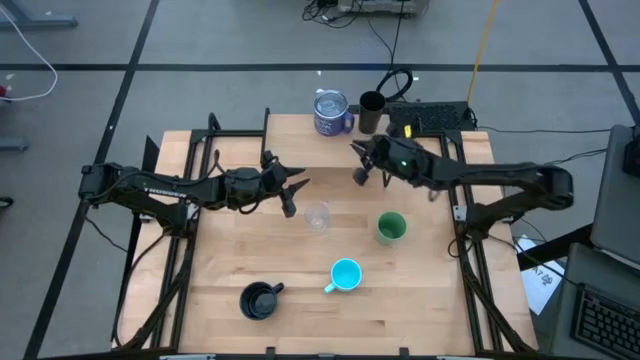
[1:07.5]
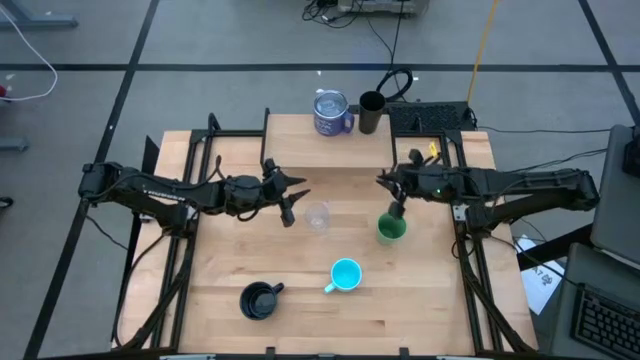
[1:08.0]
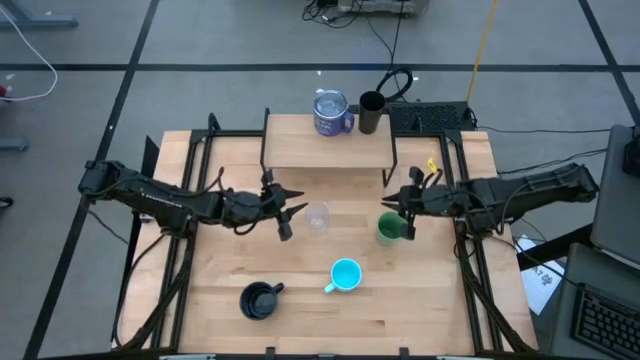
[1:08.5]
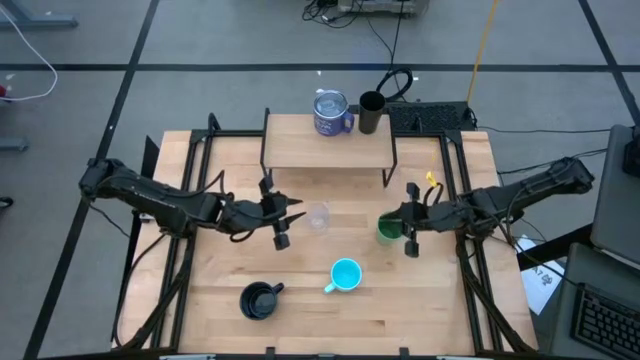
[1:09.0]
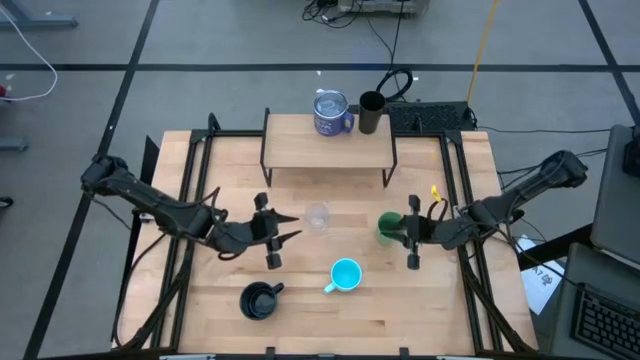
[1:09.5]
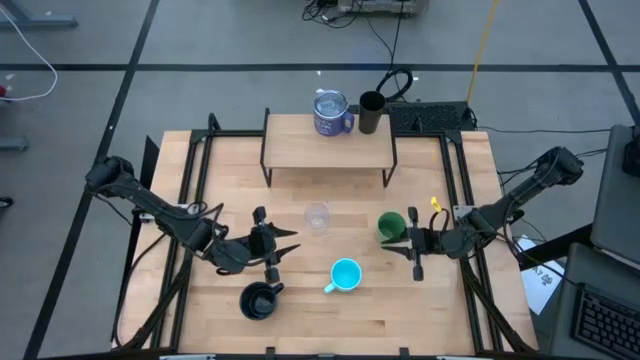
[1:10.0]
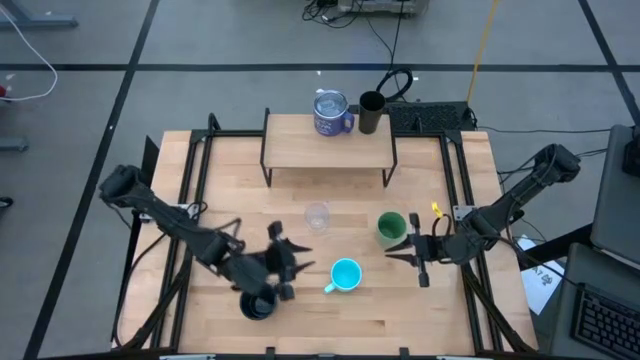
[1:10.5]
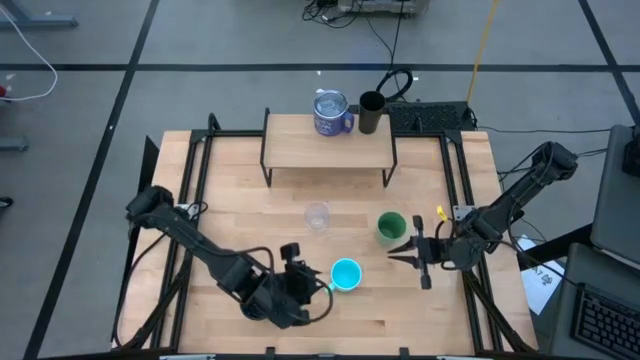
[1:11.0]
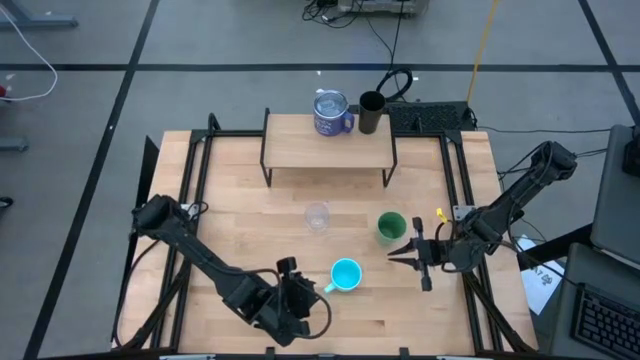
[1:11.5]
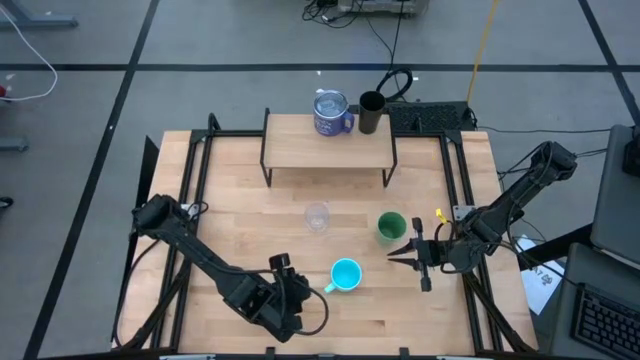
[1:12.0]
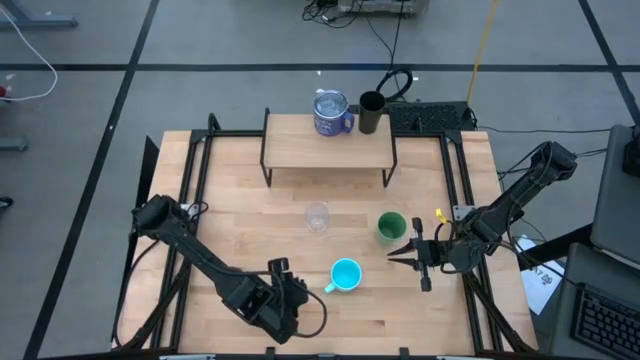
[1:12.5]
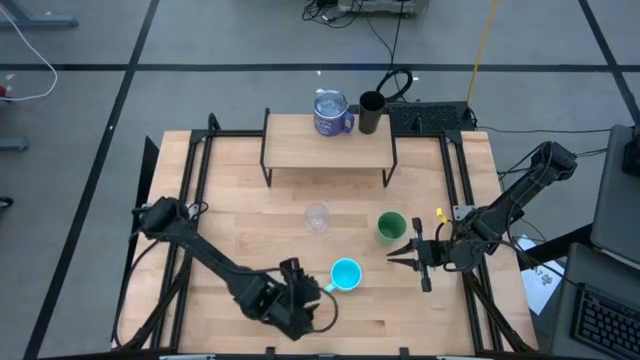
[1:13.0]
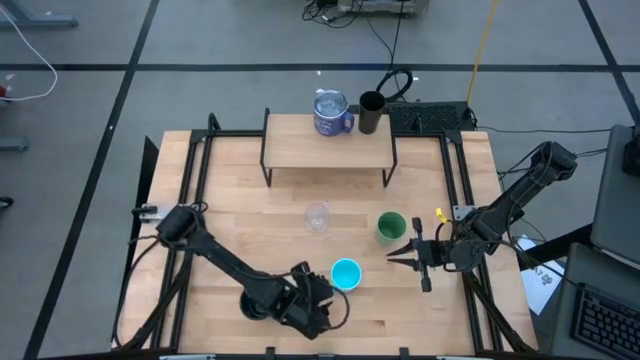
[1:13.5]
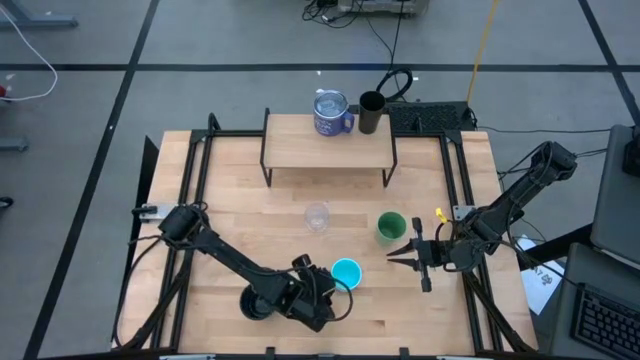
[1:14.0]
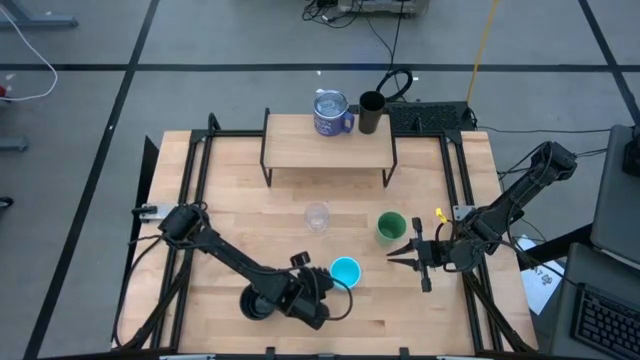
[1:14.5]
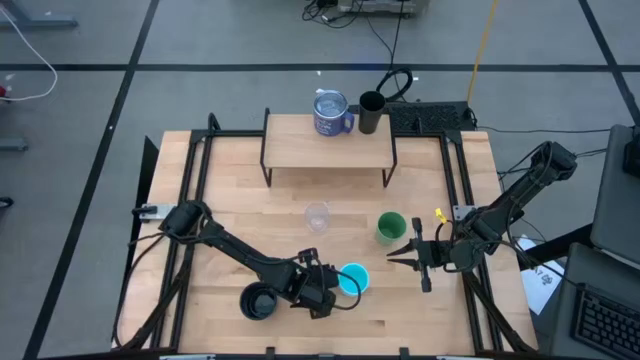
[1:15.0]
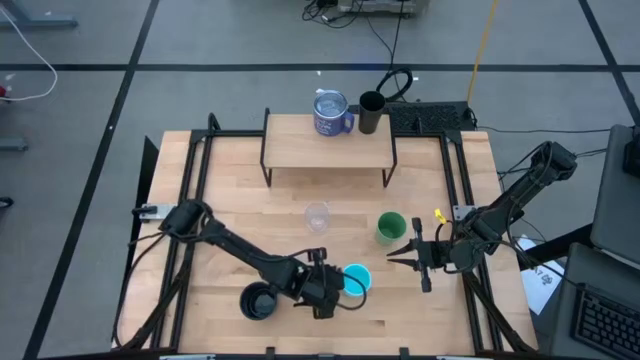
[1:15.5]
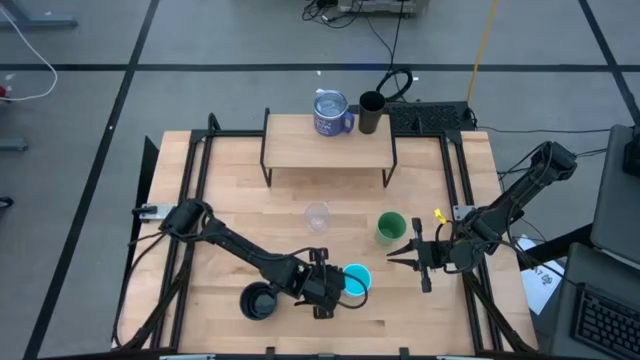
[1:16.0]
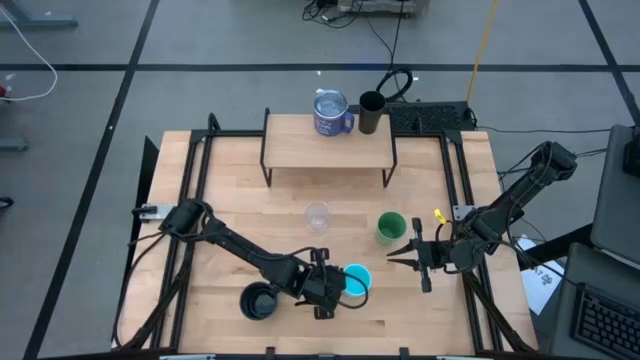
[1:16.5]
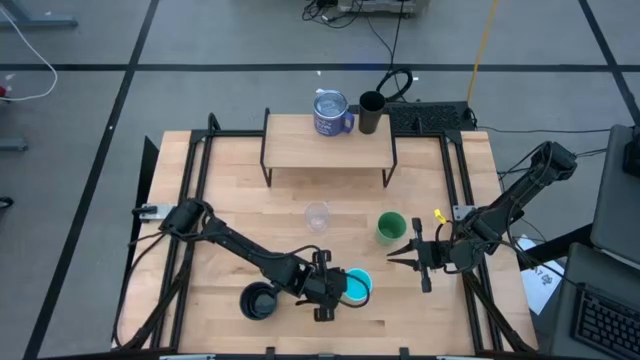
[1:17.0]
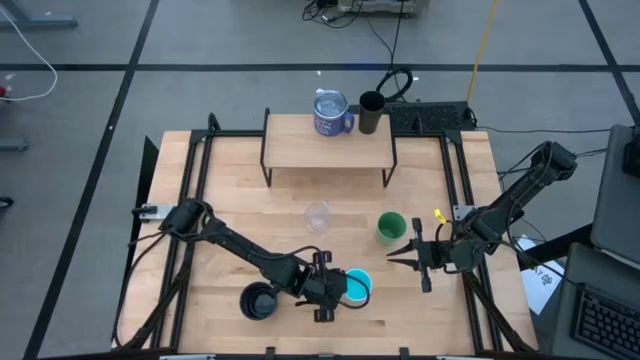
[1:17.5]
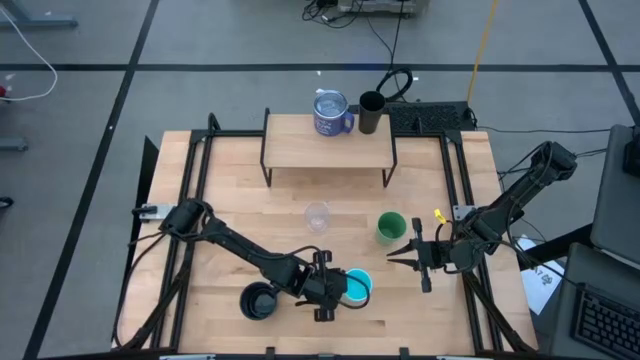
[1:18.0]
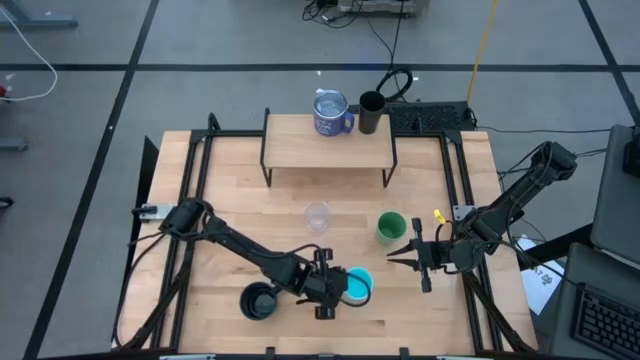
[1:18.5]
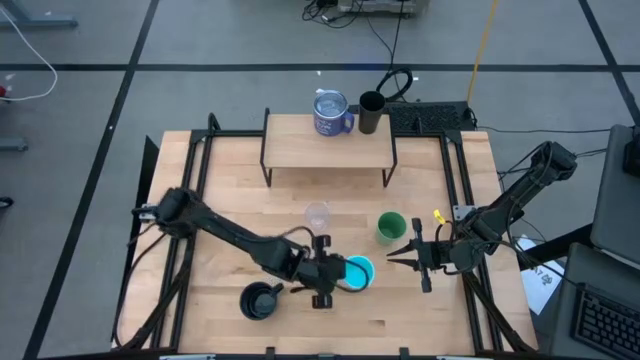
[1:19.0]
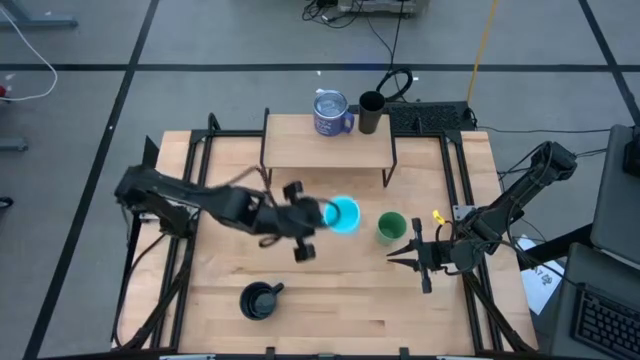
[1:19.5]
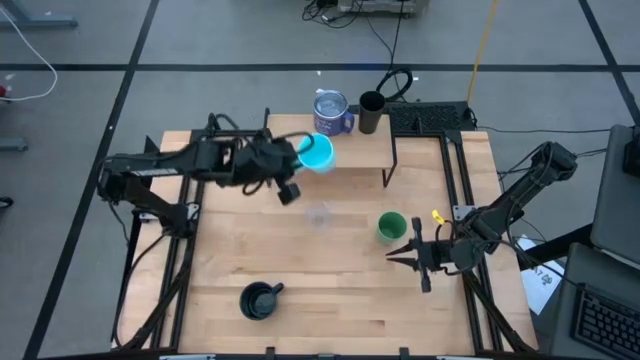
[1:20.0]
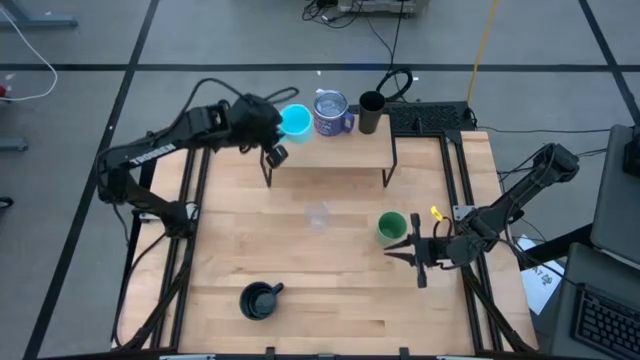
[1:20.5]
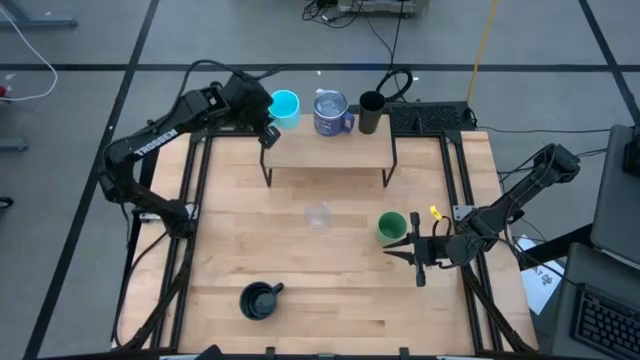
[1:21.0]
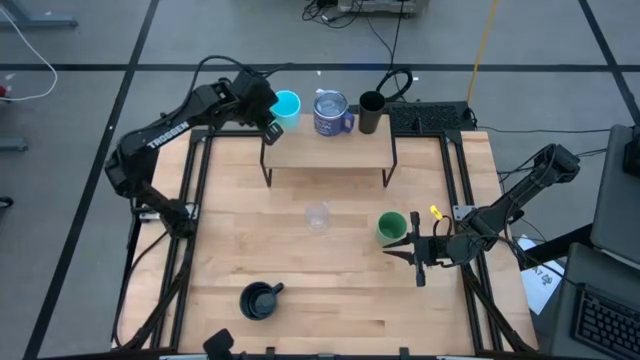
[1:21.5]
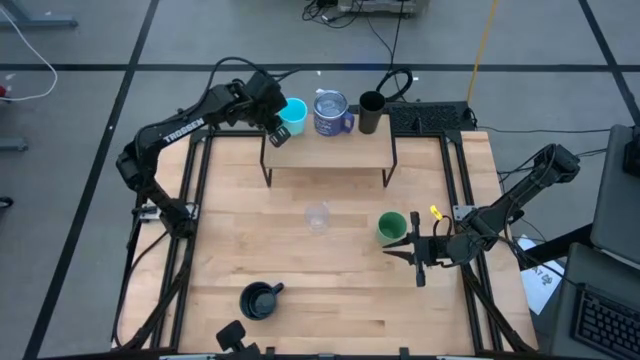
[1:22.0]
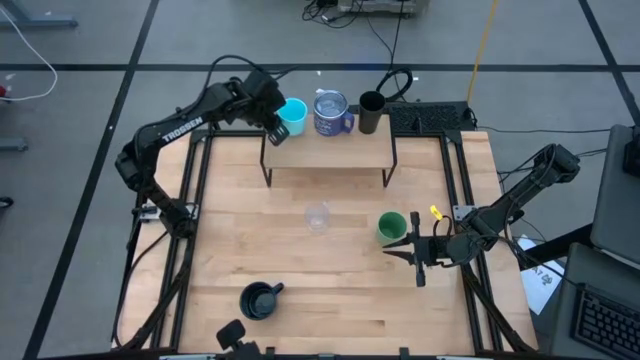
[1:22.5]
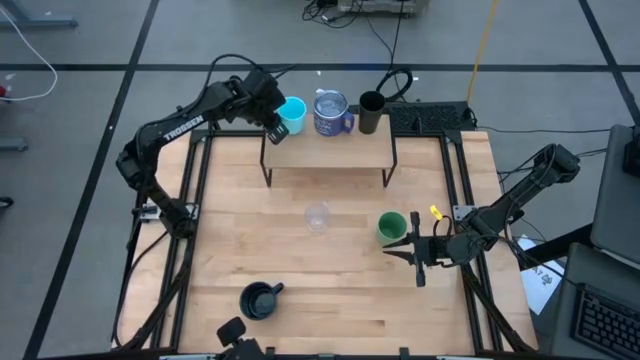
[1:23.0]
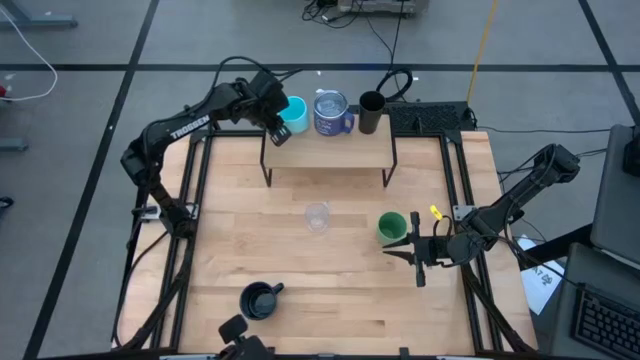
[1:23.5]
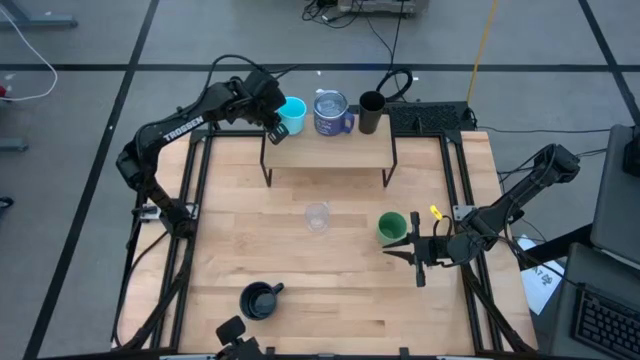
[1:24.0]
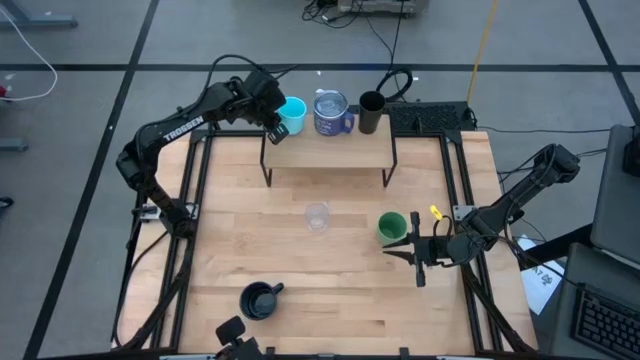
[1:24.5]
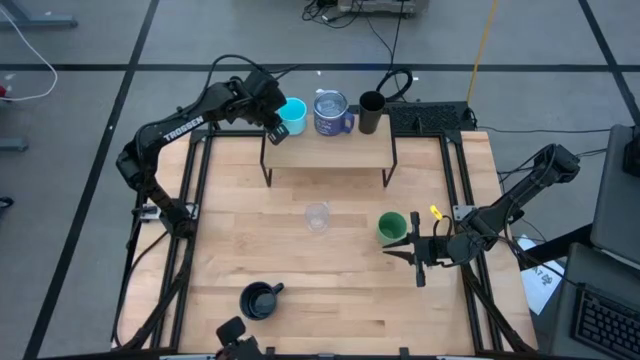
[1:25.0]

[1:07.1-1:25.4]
Task: Stack small to large cups/mugs on shelf
Put the light blue mug on the shelf

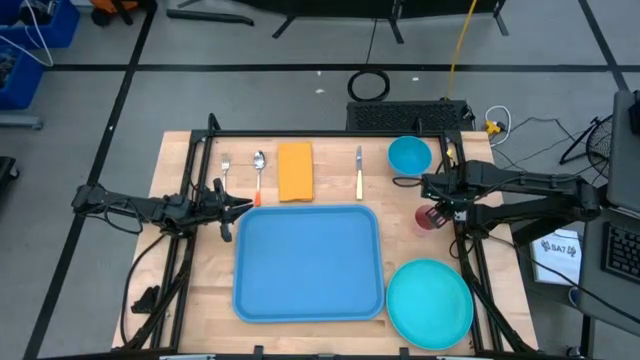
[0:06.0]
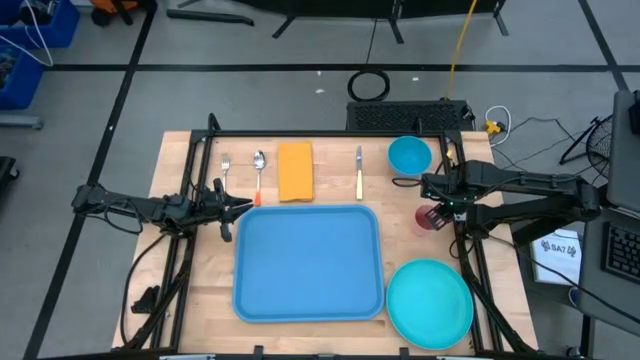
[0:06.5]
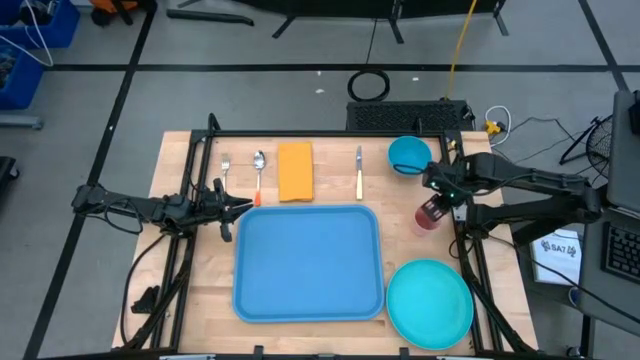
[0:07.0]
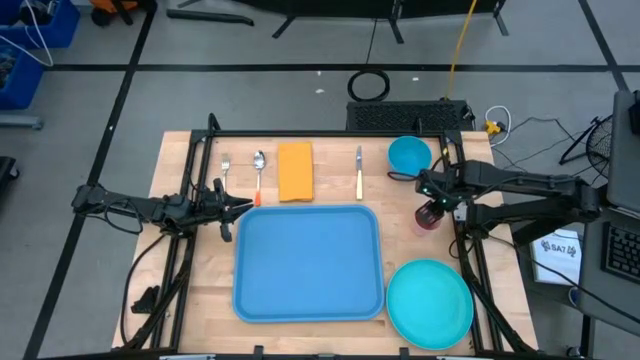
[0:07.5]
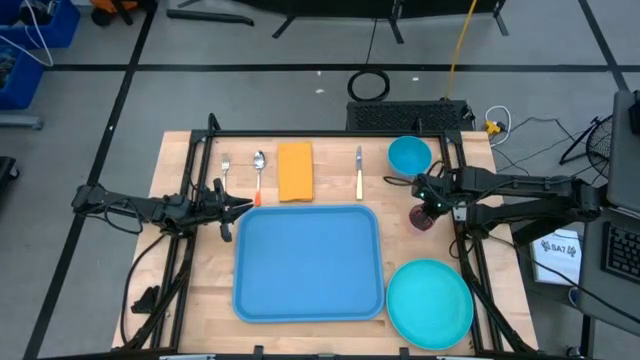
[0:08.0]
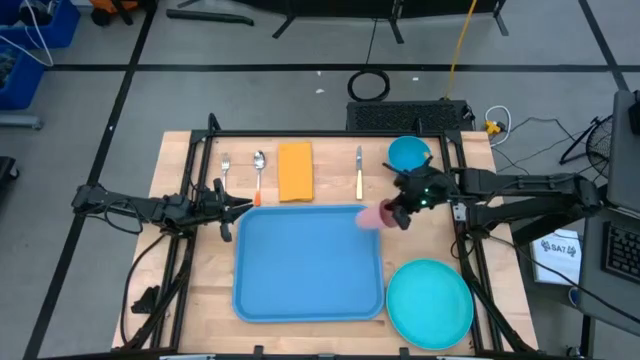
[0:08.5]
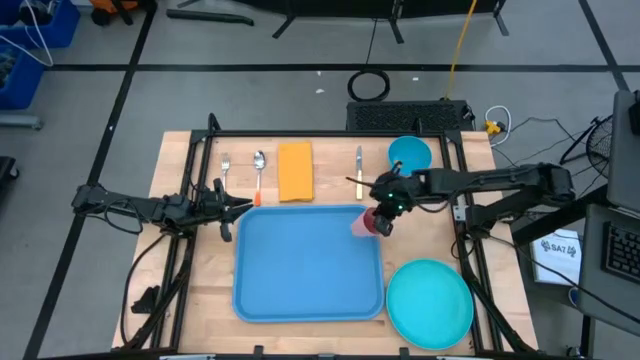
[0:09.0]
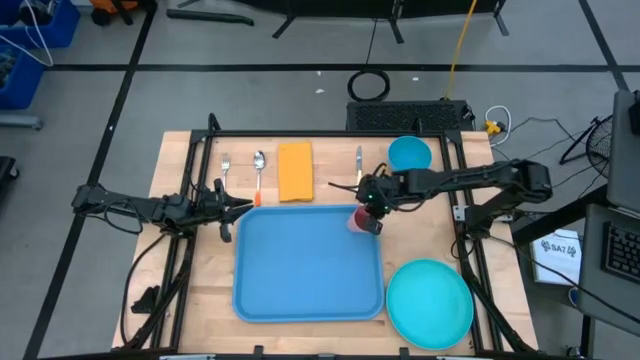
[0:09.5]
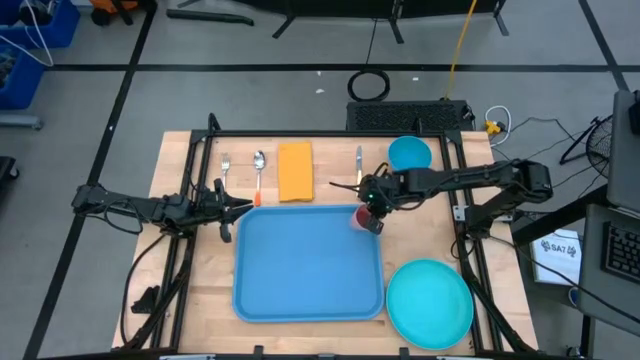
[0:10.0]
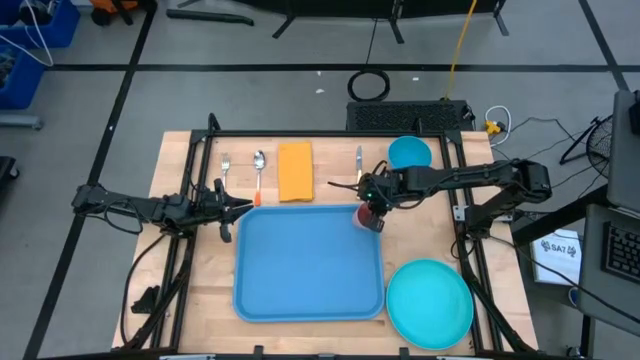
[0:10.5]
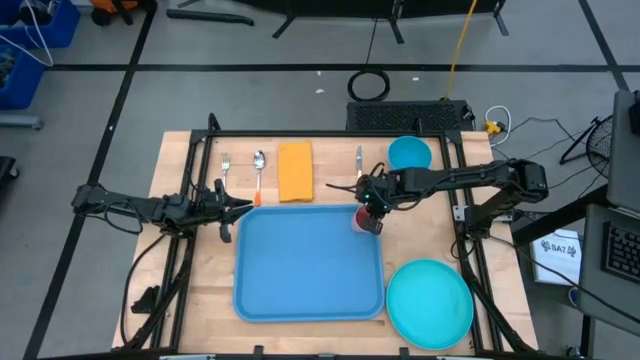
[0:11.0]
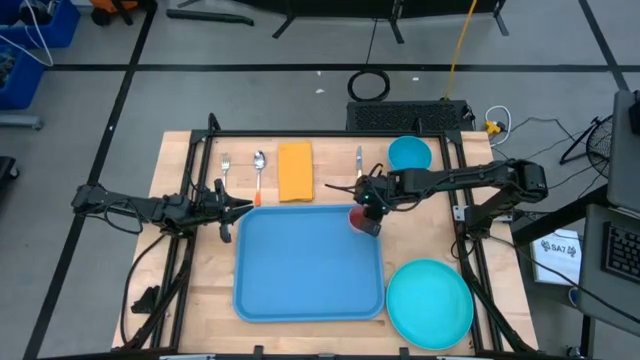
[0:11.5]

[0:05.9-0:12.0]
Task: Set up tray
Put the pink cup on the top right corner of the blue serving tray
